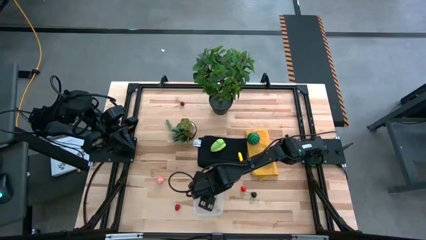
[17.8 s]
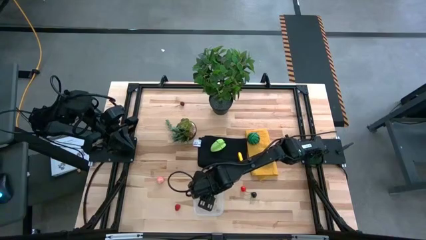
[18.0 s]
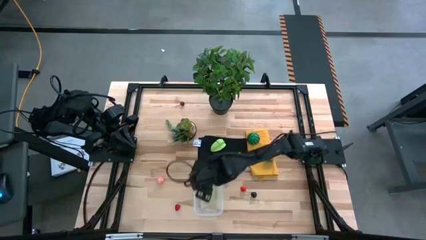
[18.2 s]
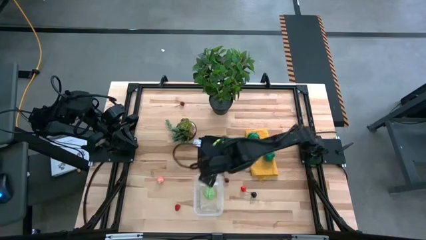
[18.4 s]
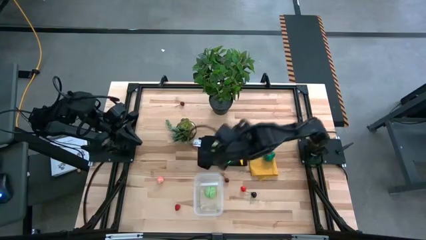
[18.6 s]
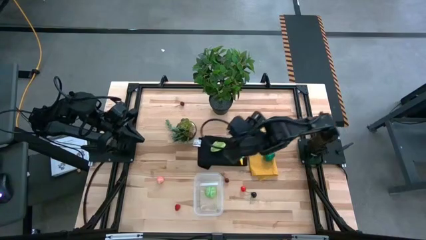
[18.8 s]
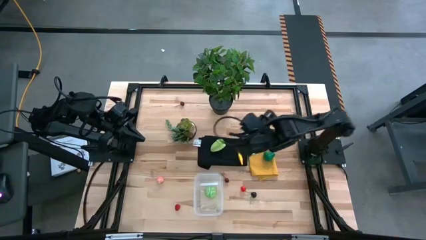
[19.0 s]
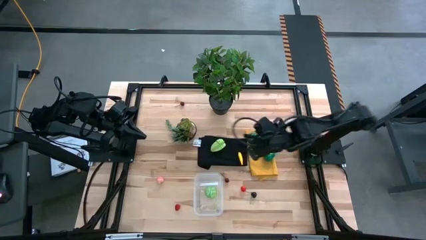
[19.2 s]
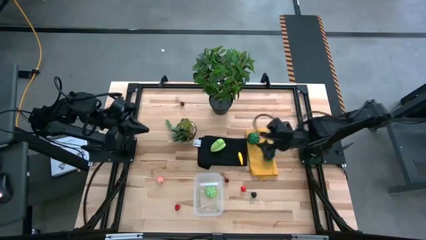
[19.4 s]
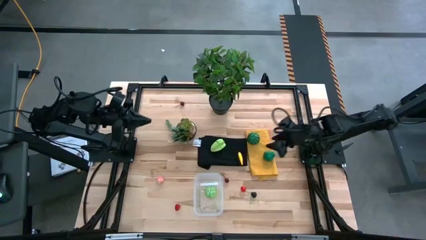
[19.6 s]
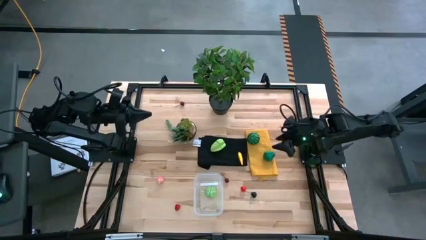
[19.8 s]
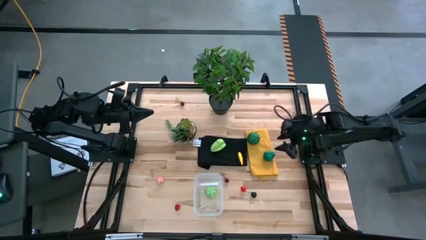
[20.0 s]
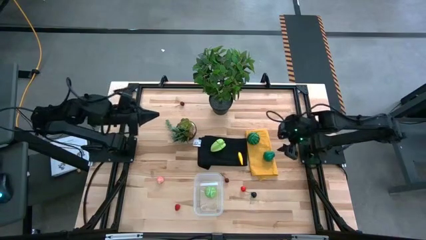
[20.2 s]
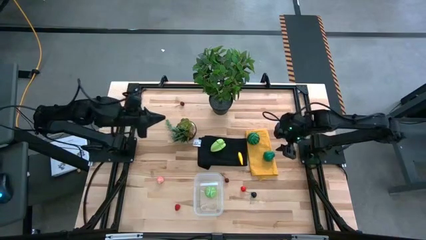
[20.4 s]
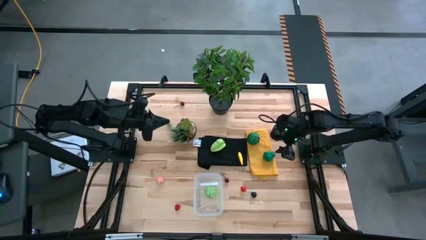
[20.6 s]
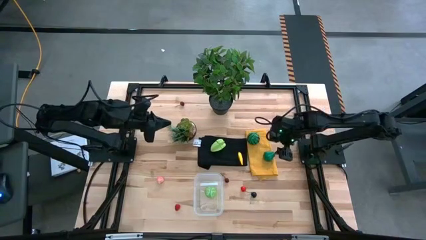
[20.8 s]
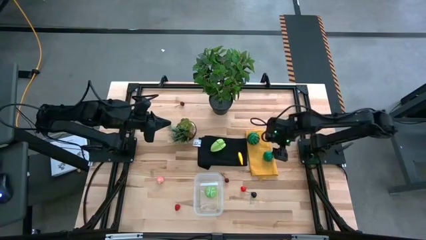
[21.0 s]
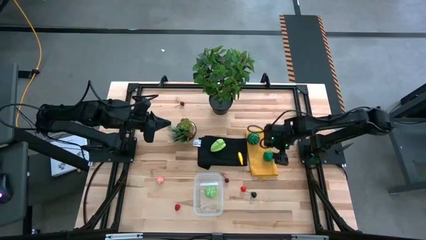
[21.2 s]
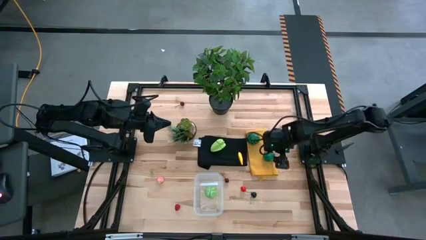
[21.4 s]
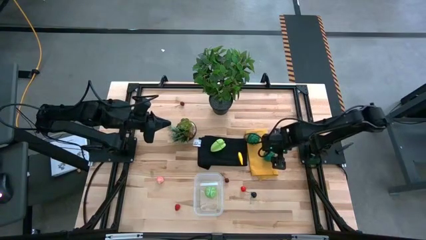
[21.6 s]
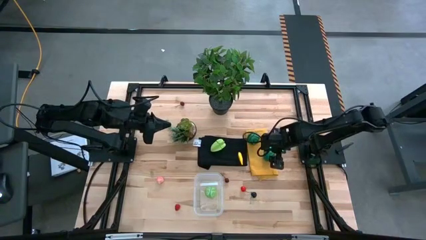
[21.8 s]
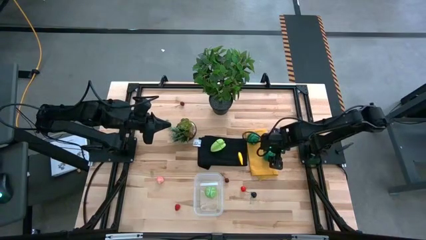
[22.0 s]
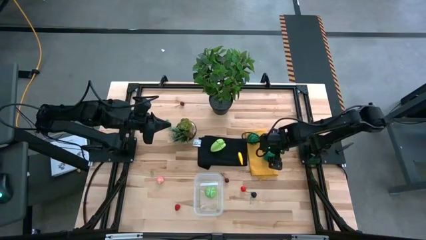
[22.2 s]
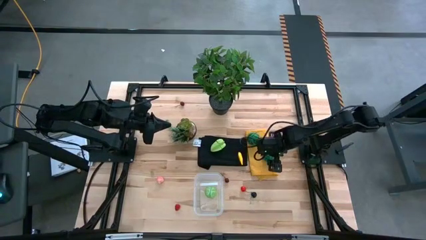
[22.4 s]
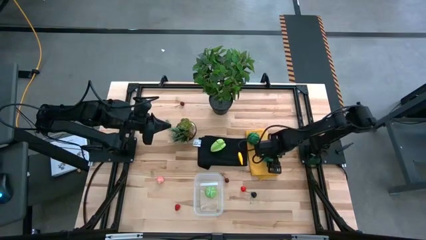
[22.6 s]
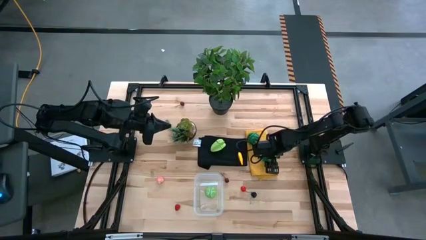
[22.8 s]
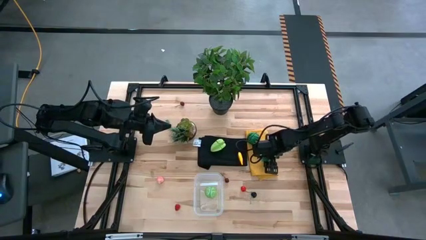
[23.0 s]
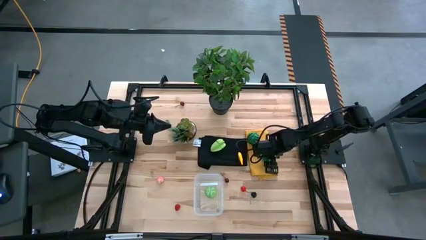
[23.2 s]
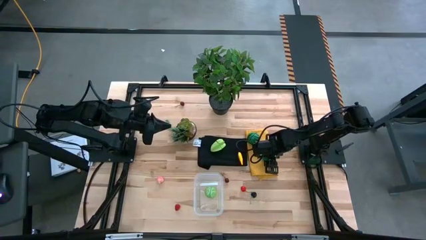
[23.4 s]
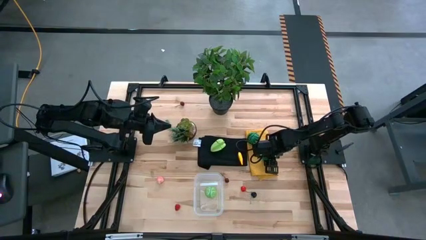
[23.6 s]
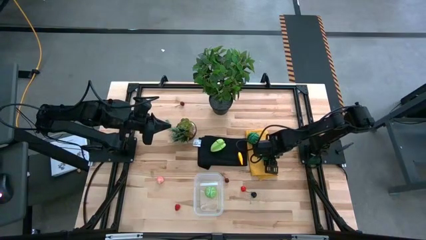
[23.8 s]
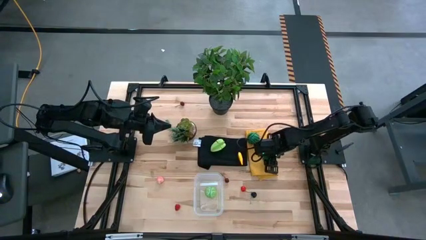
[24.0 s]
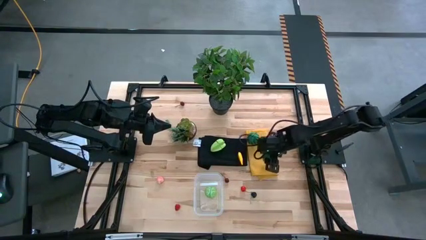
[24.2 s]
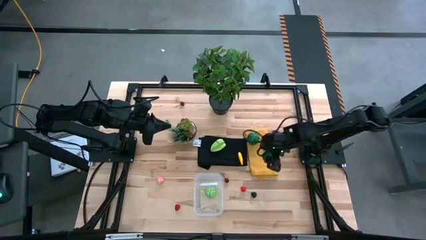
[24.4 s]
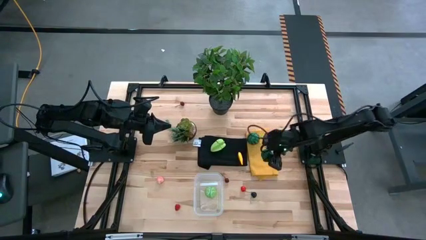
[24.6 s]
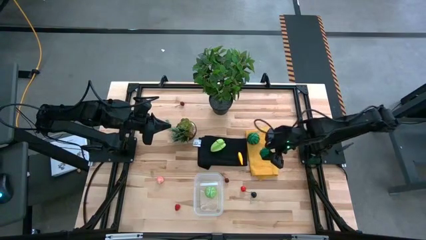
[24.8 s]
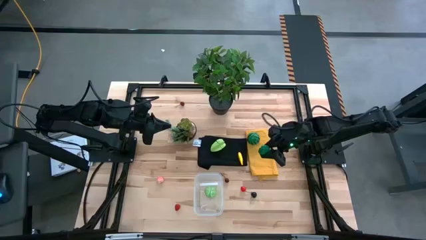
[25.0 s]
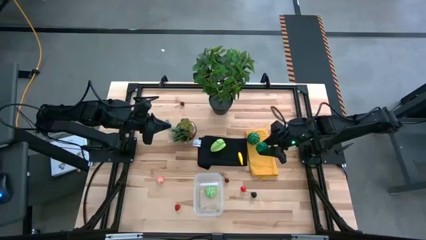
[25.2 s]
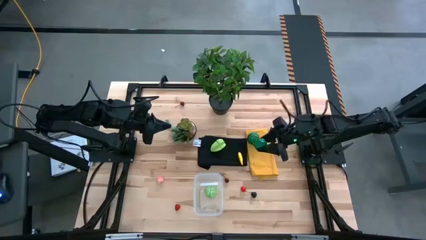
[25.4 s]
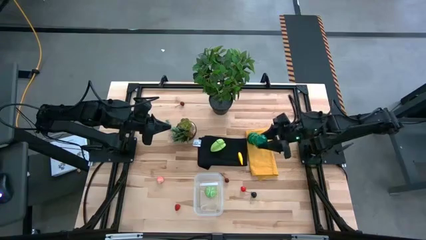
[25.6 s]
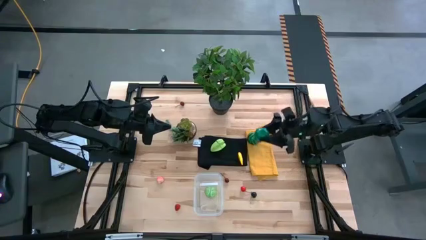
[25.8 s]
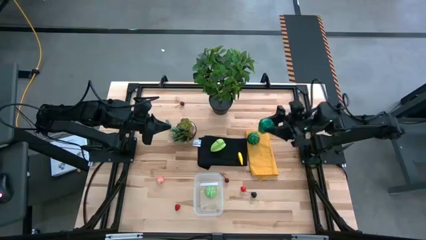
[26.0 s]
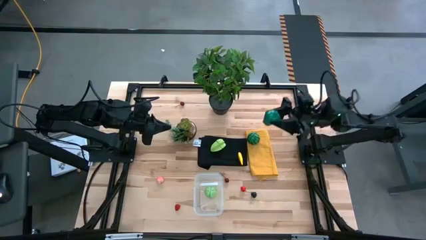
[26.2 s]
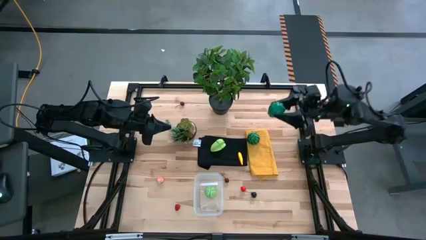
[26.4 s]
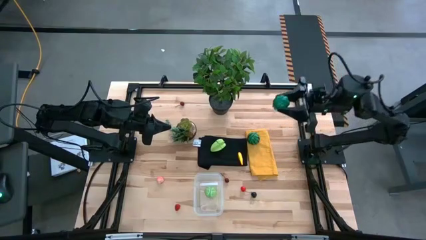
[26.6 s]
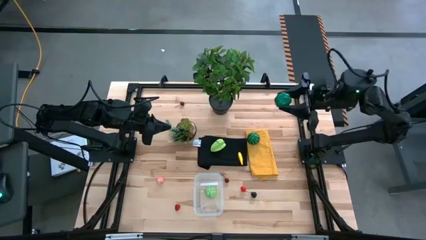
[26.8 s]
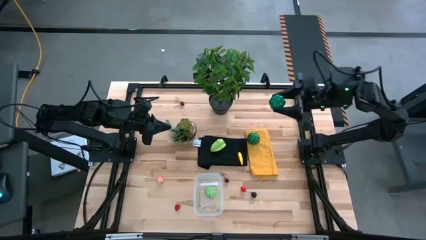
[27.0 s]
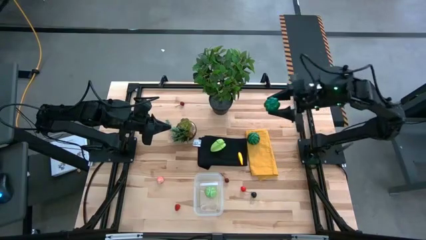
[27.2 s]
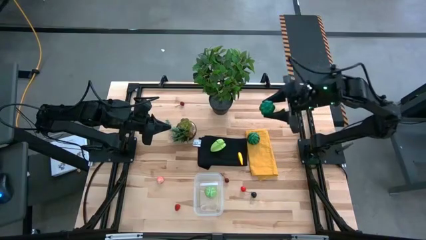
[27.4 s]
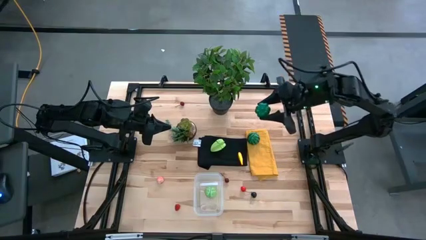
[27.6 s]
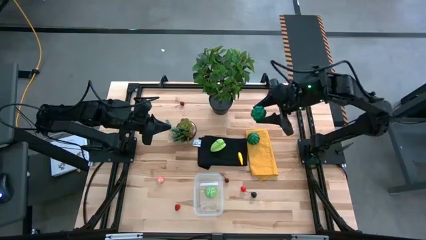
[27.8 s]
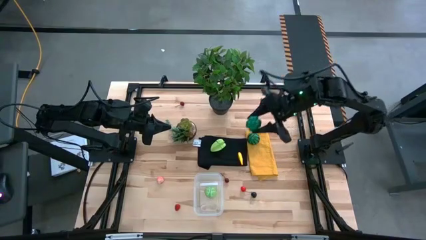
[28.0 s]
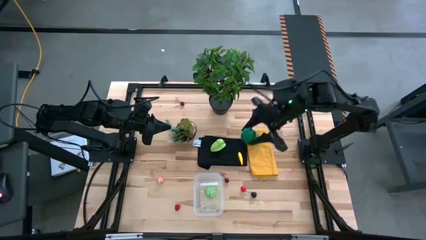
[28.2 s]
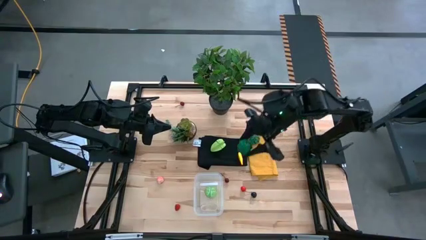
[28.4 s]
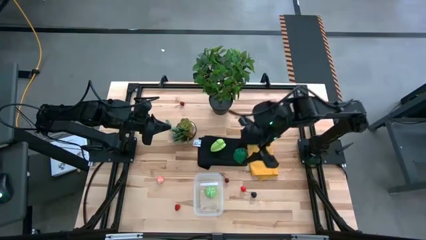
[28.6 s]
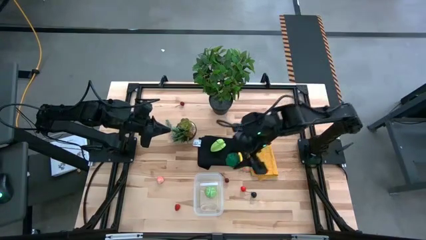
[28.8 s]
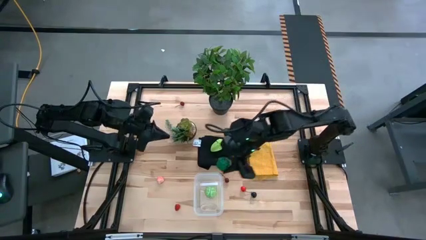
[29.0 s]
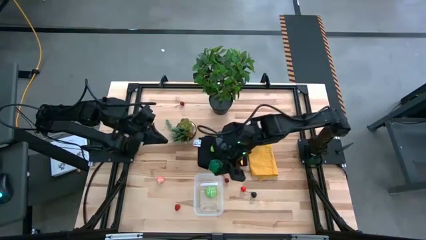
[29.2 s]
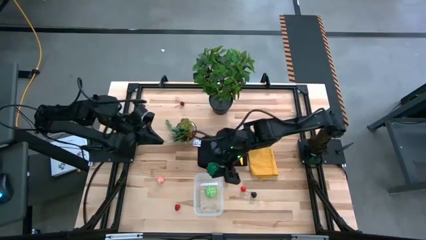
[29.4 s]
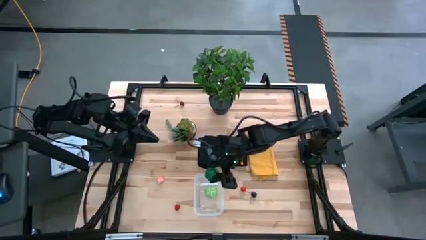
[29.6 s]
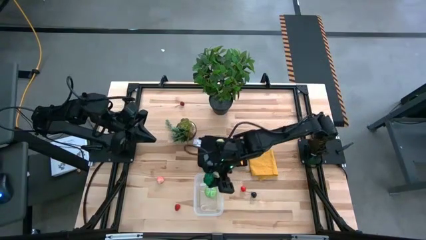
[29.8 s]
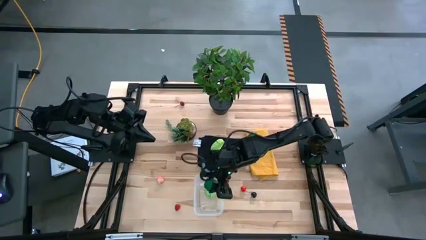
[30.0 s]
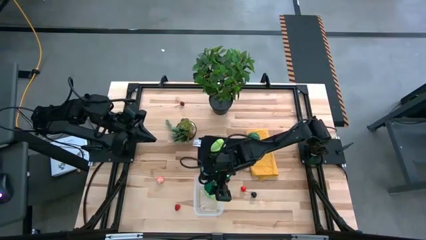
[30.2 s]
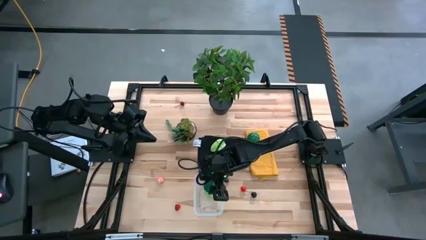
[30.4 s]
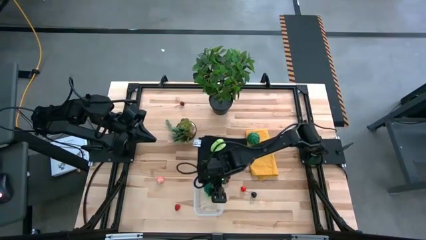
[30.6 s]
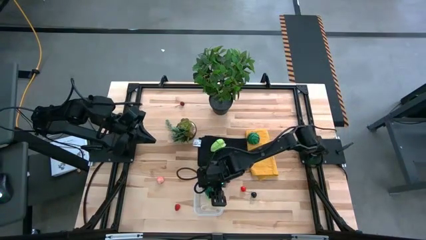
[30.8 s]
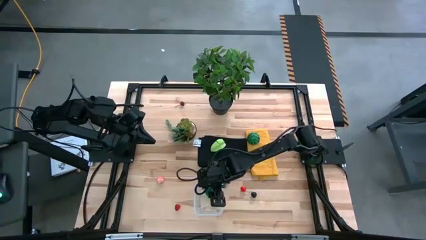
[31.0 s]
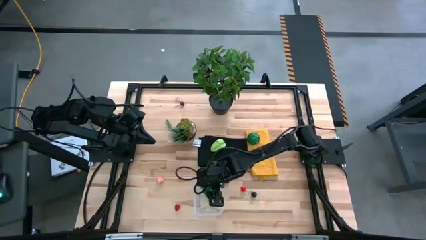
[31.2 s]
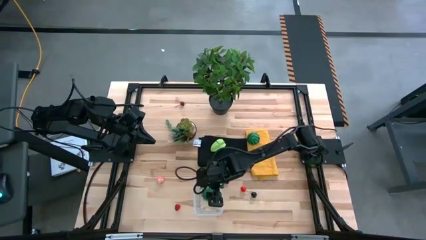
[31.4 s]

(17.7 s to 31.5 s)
Task: Pick and placing Produce into tupperware
Put the bell pepper into the bin
